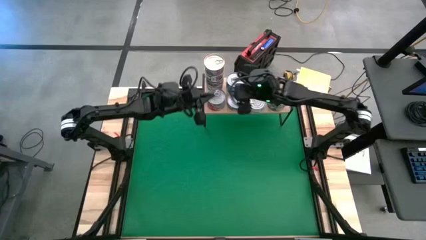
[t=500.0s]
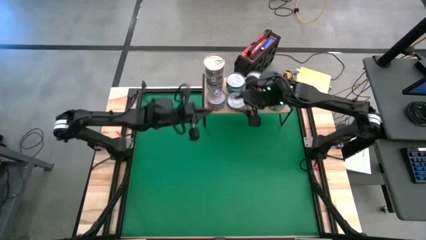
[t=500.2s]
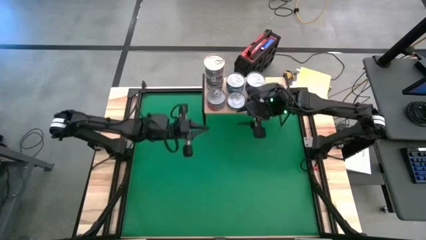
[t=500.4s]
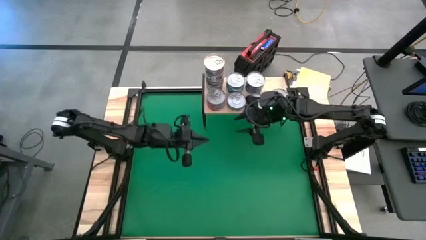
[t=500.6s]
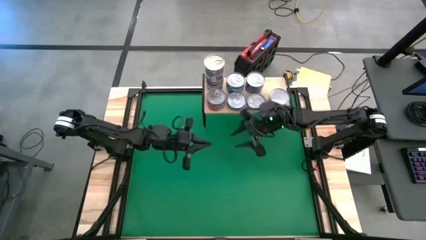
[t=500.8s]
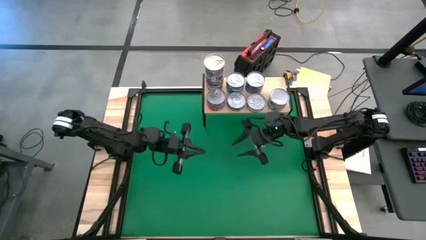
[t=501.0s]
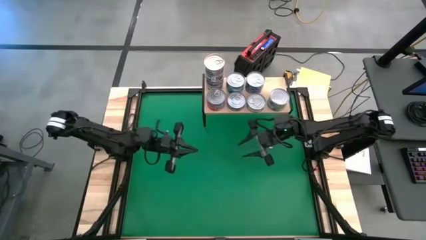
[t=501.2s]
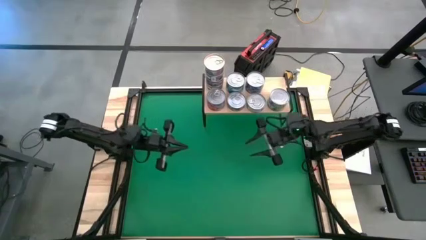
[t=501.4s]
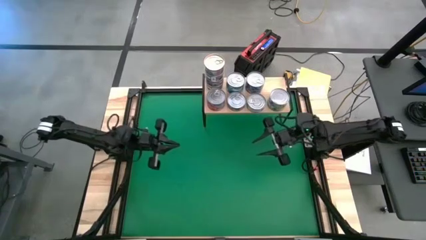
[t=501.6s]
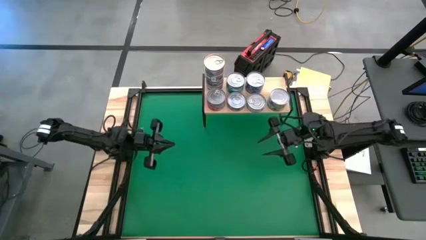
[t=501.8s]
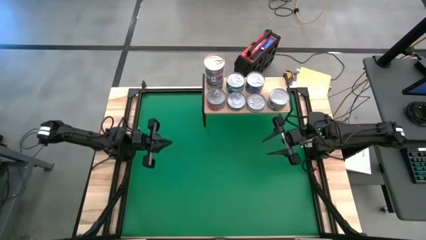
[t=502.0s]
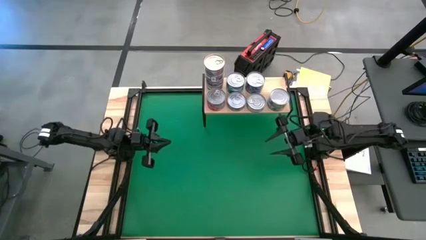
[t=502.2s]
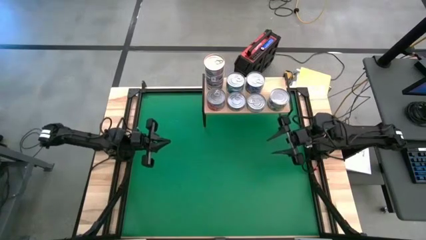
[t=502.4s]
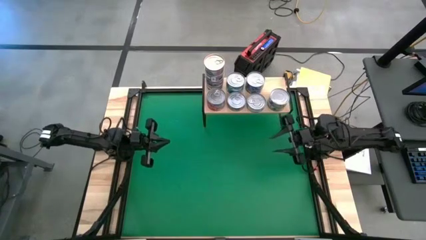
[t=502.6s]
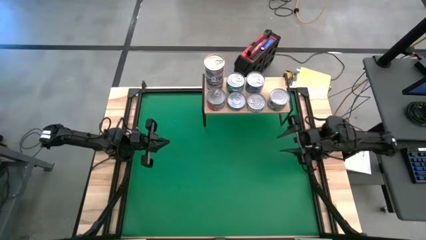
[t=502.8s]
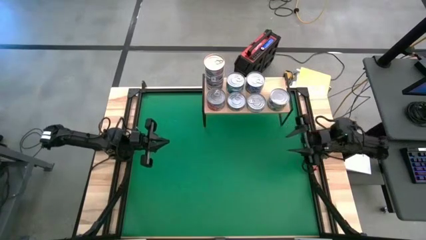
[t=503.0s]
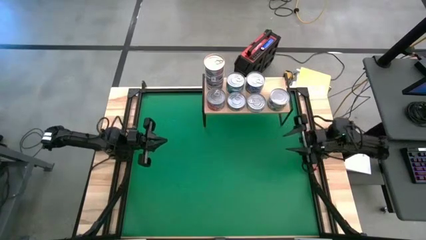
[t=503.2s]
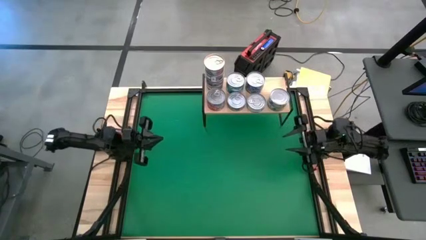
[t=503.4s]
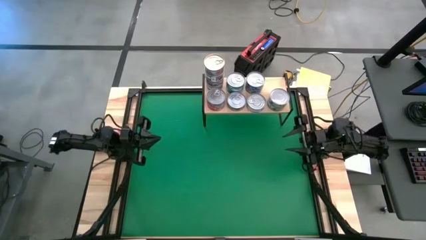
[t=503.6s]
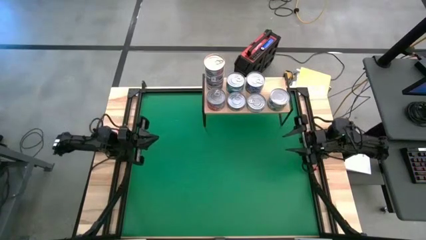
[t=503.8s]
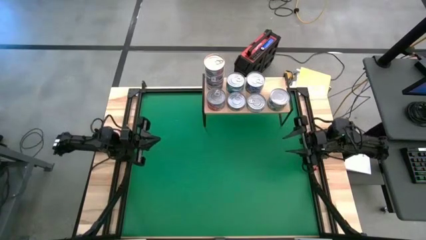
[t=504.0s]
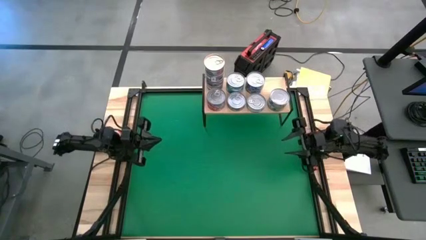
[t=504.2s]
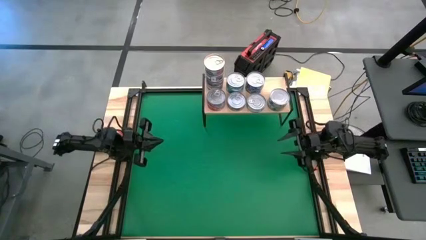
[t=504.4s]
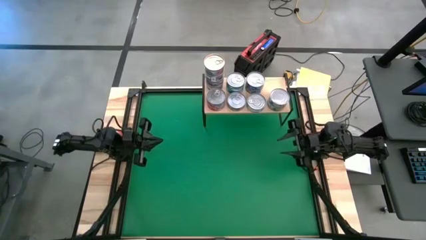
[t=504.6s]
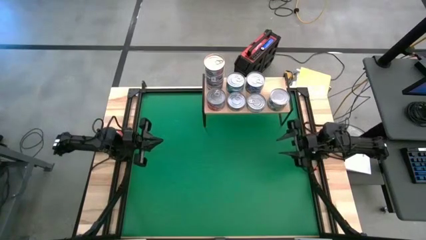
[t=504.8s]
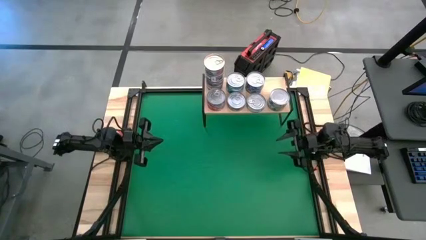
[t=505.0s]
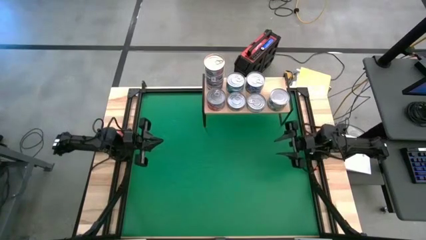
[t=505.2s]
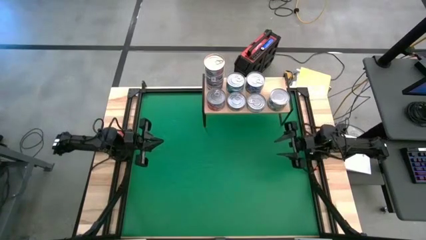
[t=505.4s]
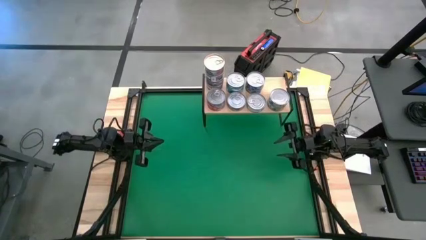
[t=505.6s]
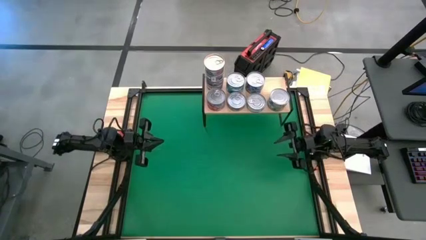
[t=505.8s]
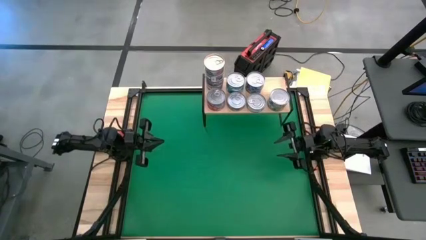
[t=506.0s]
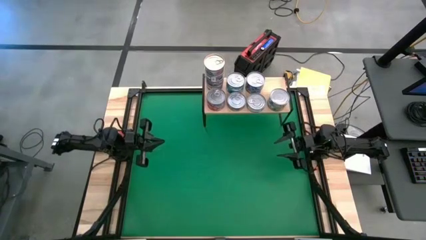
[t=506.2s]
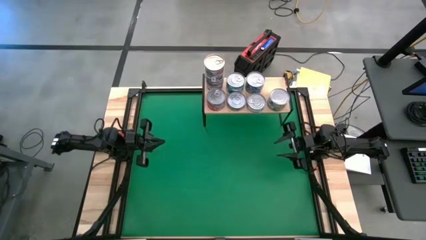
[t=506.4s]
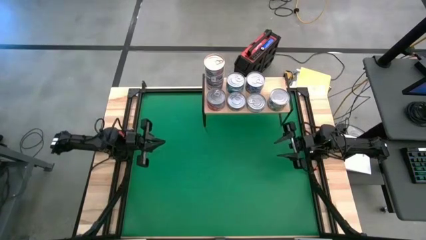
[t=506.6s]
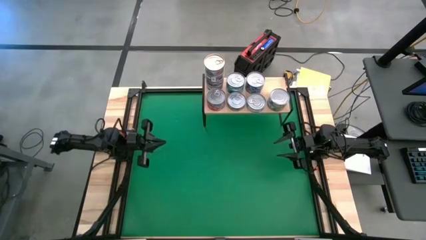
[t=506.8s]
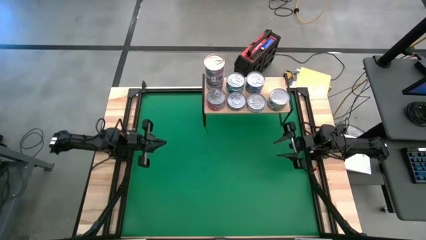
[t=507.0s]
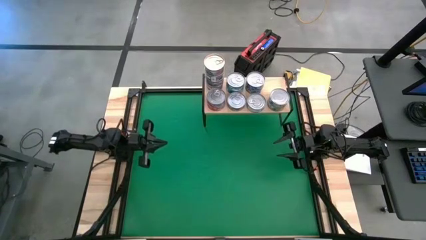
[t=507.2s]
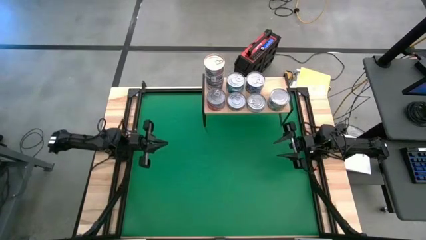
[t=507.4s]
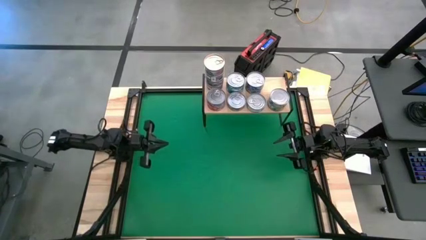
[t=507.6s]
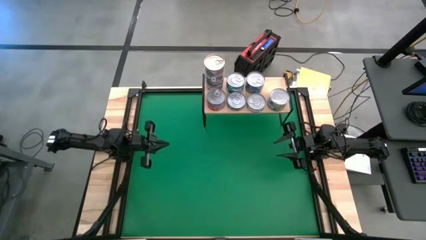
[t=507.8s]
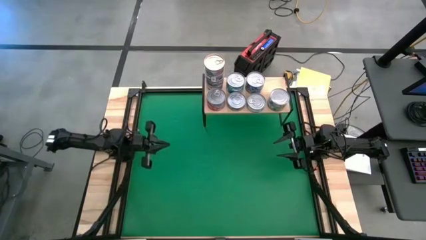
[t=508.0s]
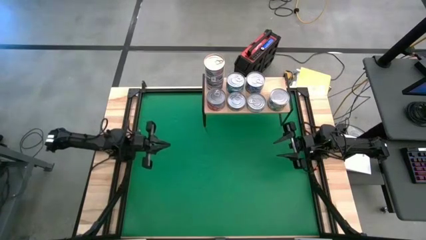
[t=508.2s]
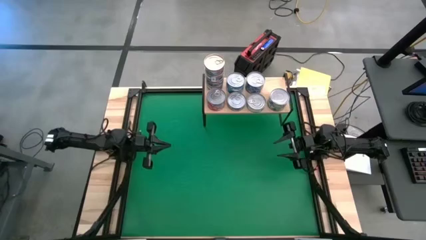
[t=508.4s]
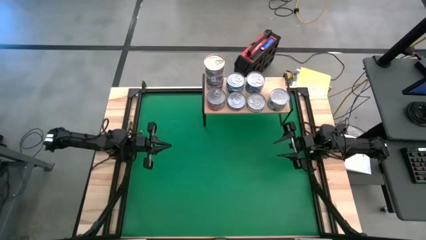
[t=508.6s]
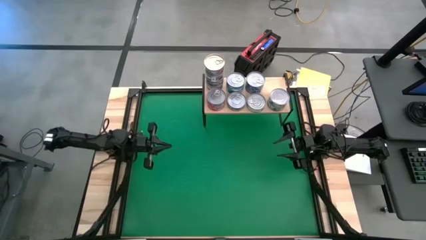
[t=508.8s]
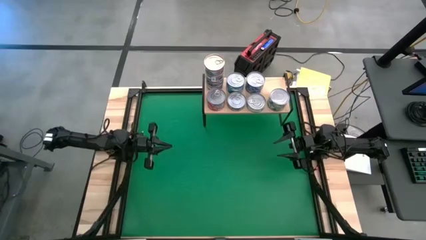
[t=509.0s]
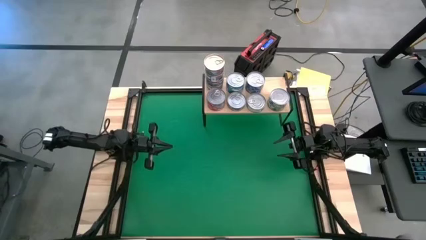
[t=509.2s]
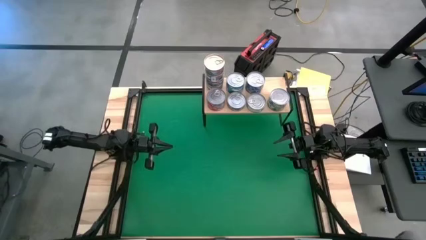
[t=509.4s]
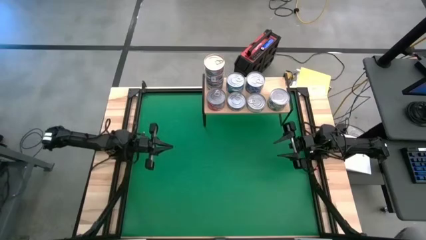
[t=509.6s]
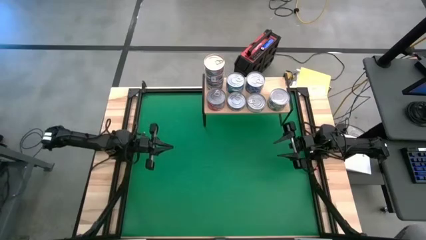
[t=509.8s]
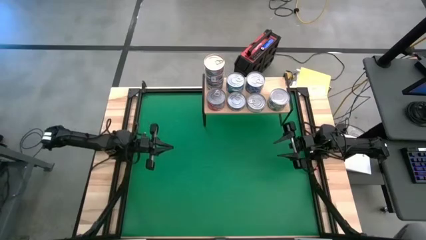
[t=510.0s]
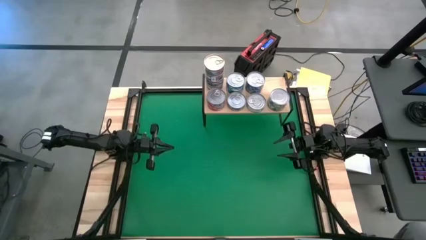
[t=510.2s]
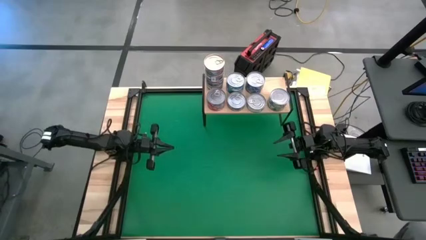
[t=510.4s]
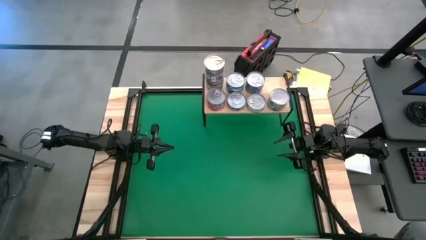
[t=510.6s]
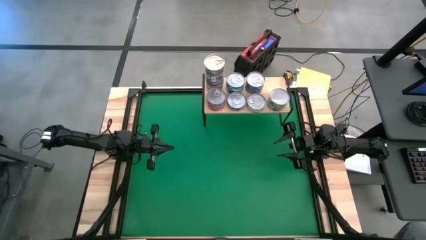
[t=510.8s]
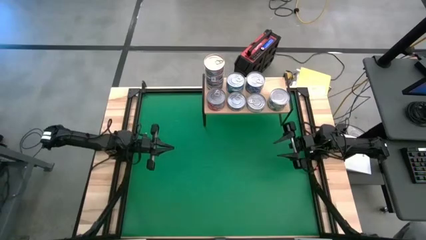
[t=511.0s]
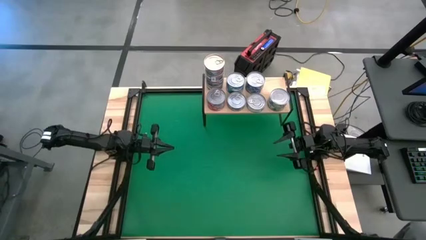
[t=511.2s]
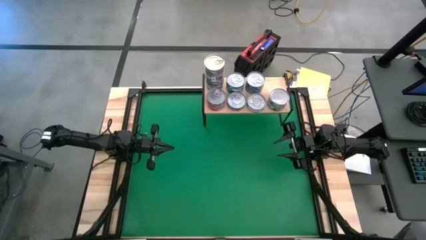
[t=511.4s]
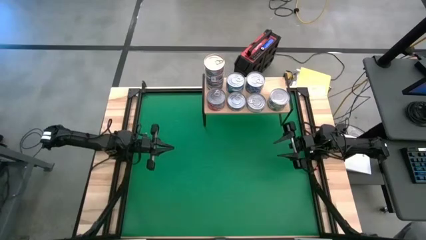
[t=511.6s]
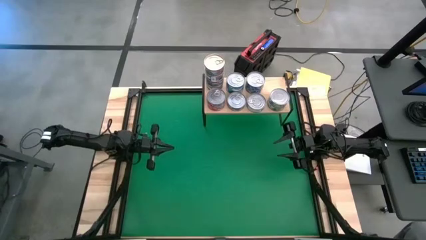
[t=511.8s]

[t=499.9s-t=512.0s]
Task: Stack canned seafood by type on shelf
Return to Home Position
